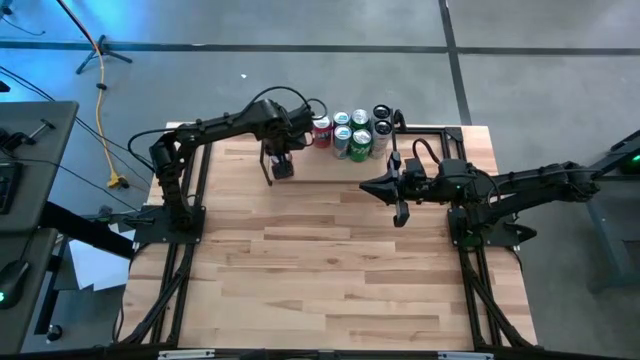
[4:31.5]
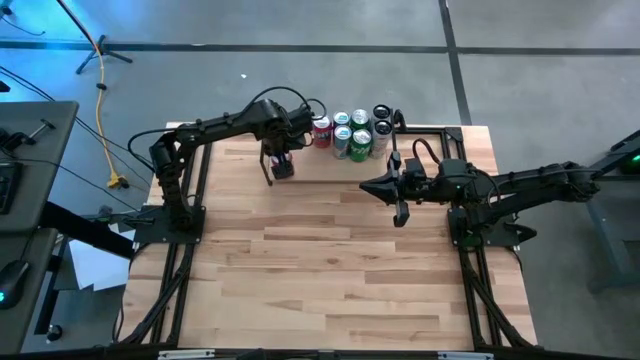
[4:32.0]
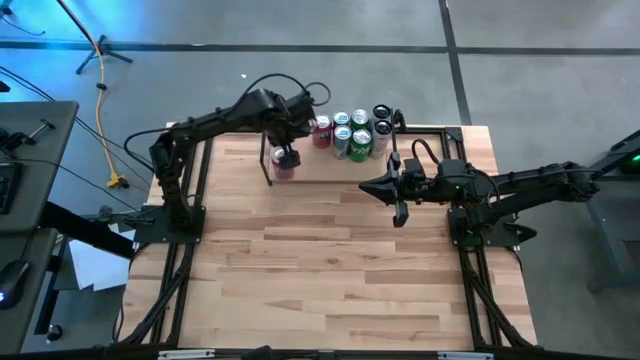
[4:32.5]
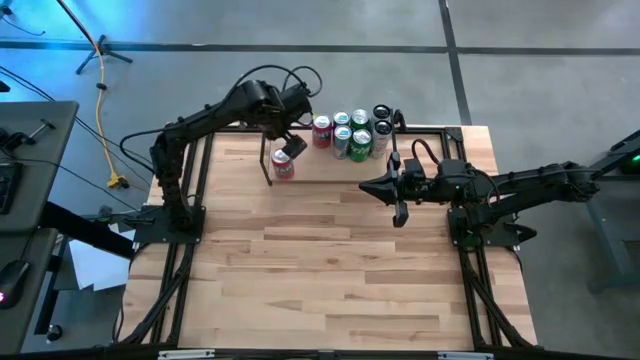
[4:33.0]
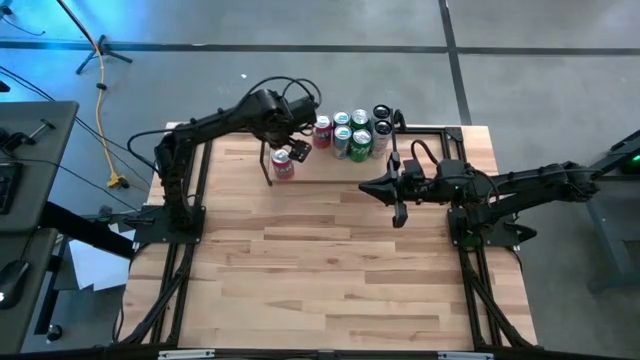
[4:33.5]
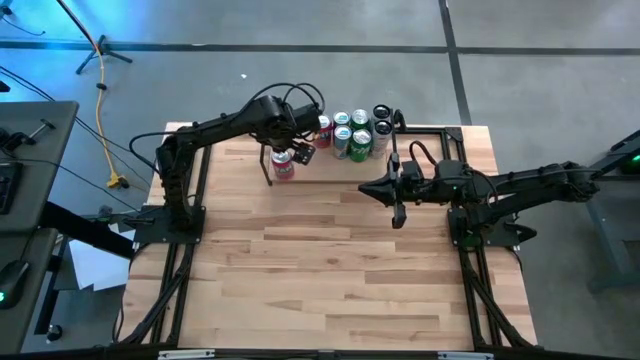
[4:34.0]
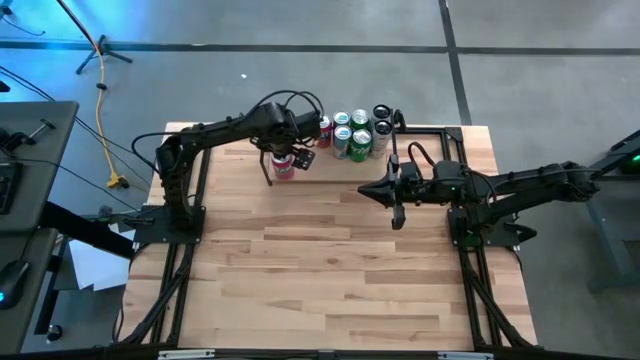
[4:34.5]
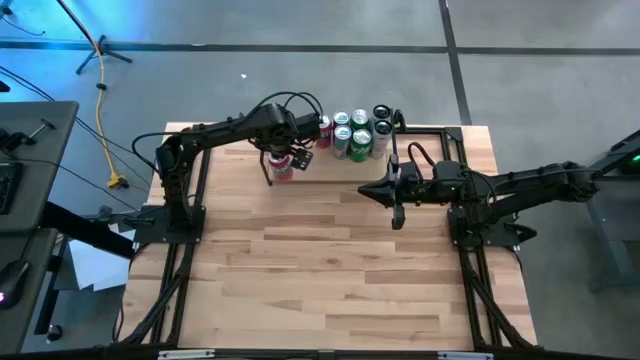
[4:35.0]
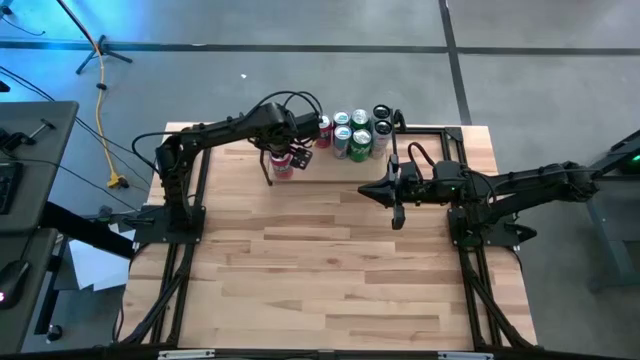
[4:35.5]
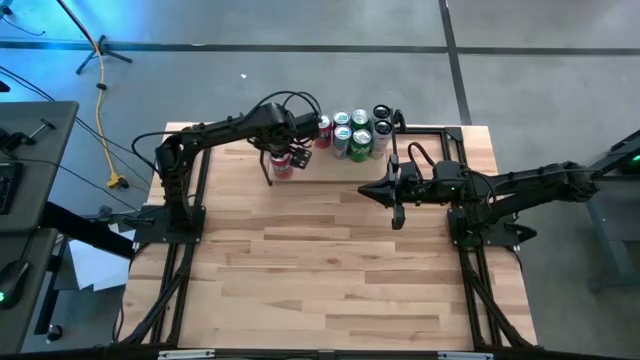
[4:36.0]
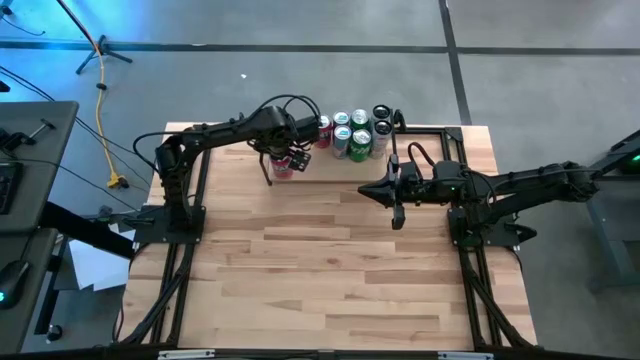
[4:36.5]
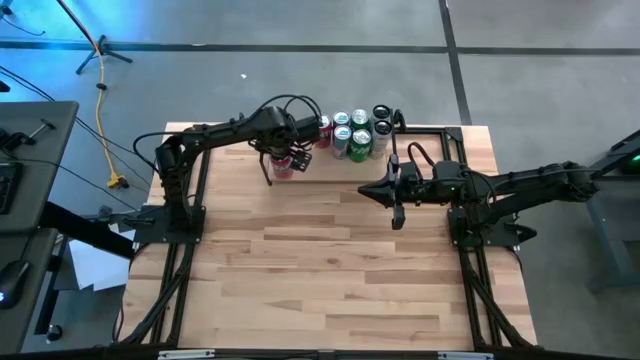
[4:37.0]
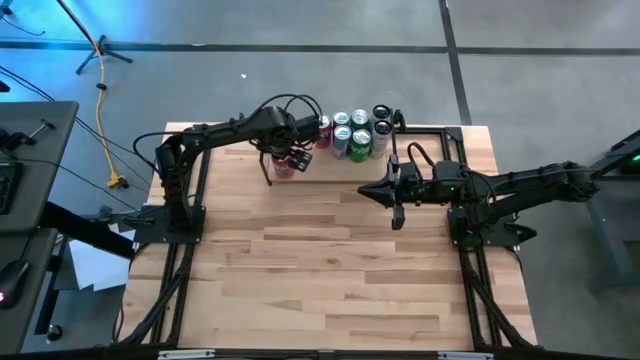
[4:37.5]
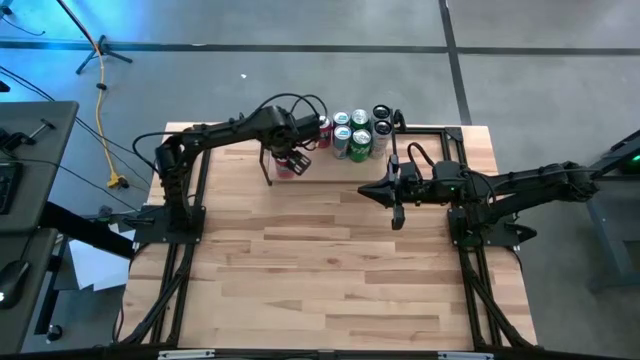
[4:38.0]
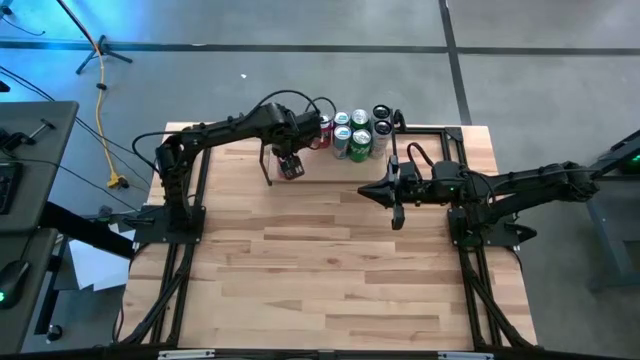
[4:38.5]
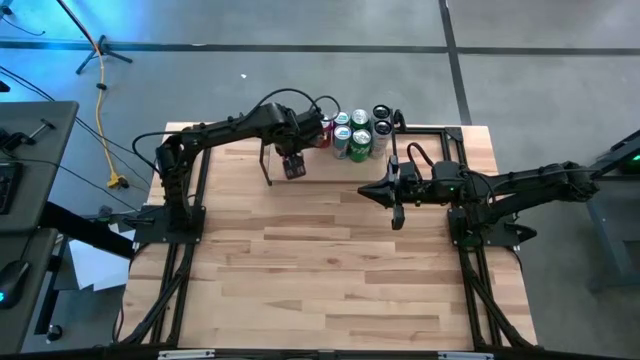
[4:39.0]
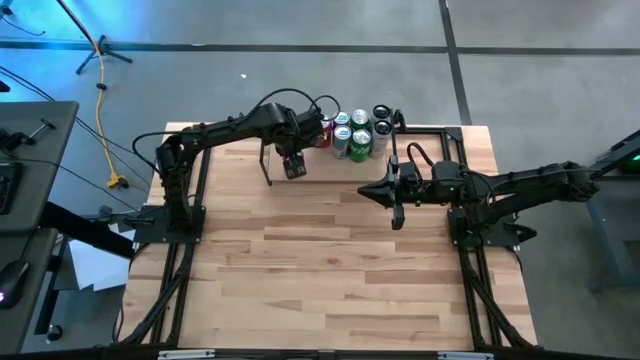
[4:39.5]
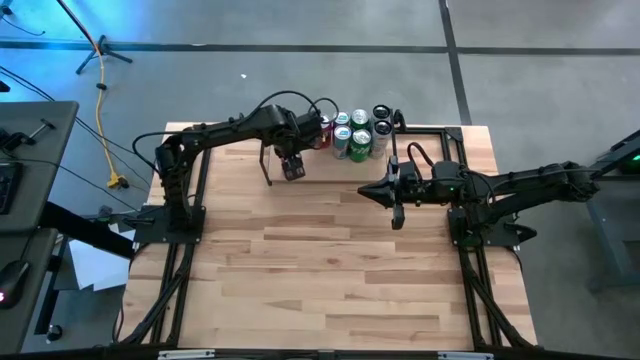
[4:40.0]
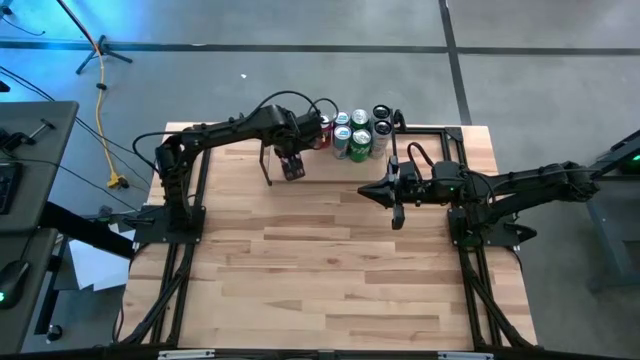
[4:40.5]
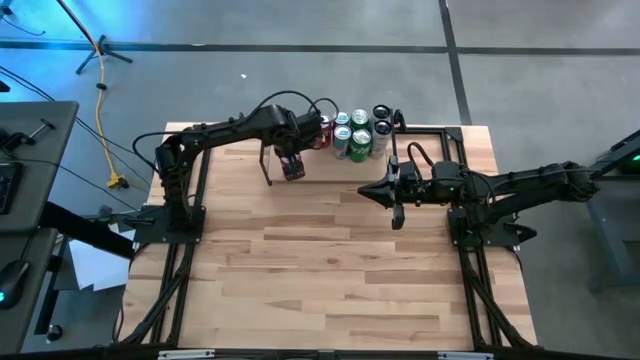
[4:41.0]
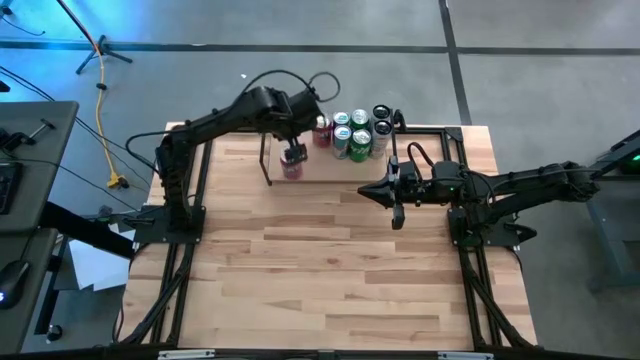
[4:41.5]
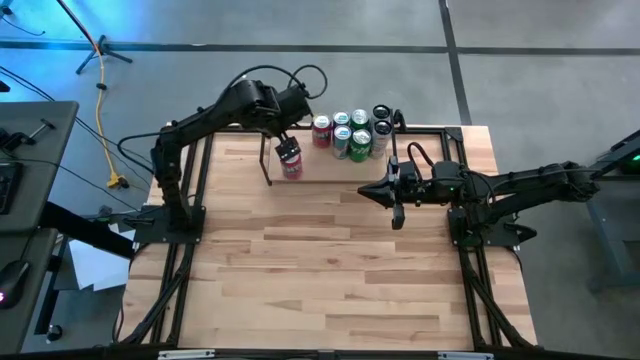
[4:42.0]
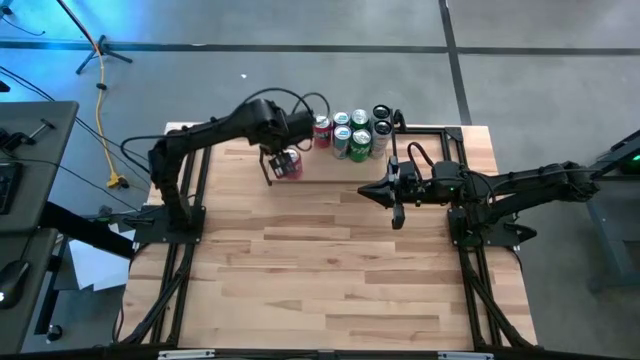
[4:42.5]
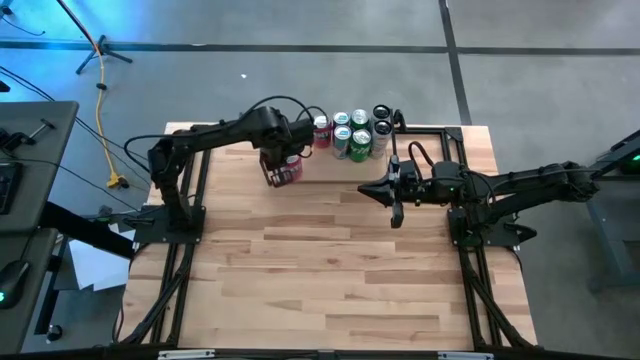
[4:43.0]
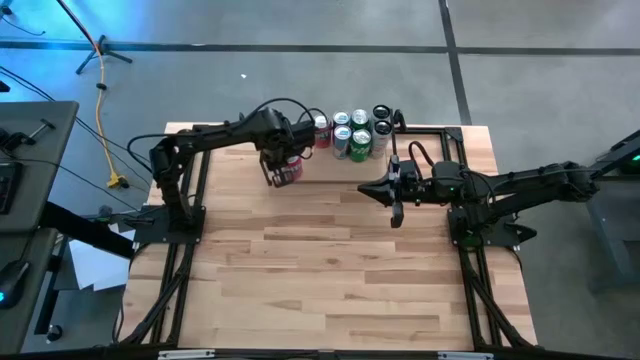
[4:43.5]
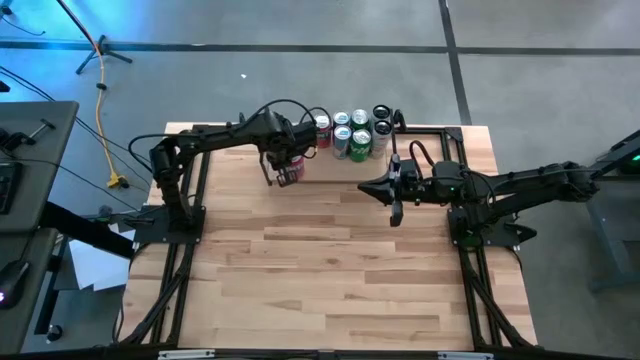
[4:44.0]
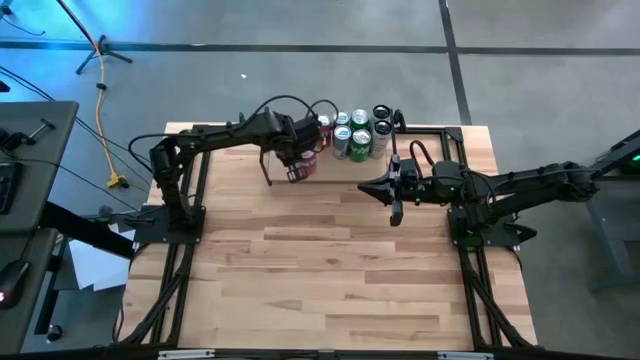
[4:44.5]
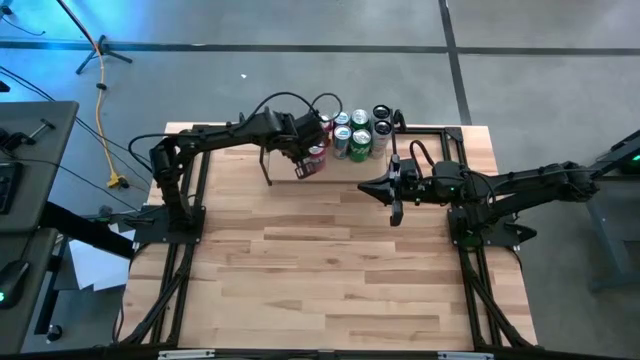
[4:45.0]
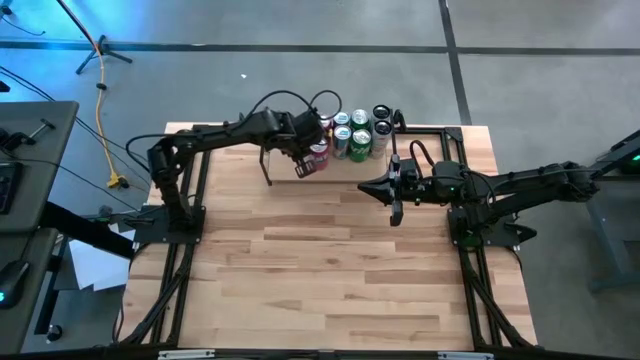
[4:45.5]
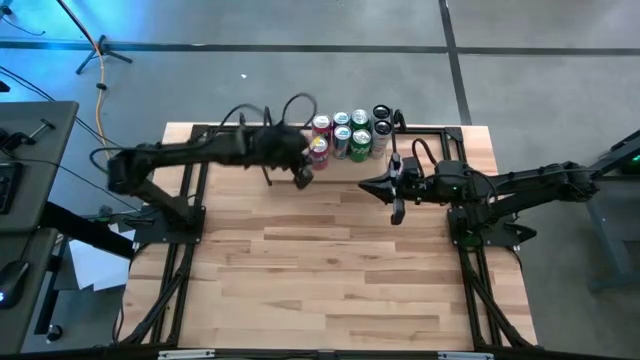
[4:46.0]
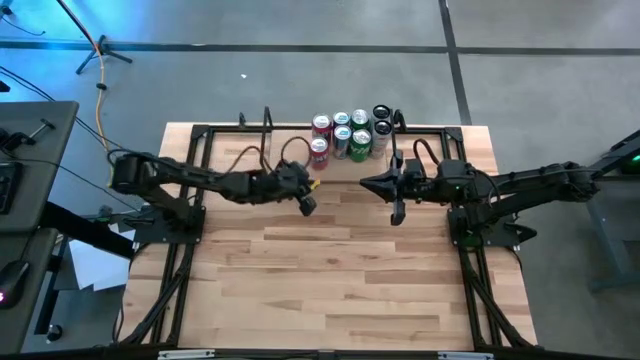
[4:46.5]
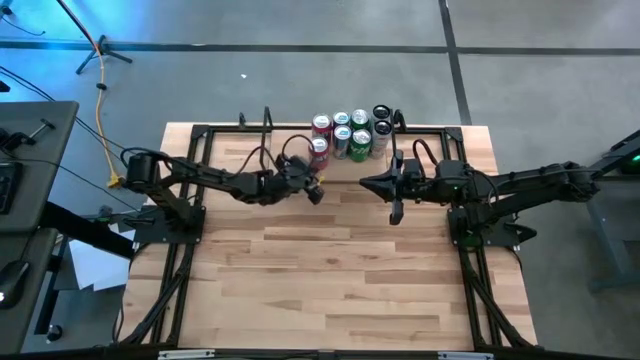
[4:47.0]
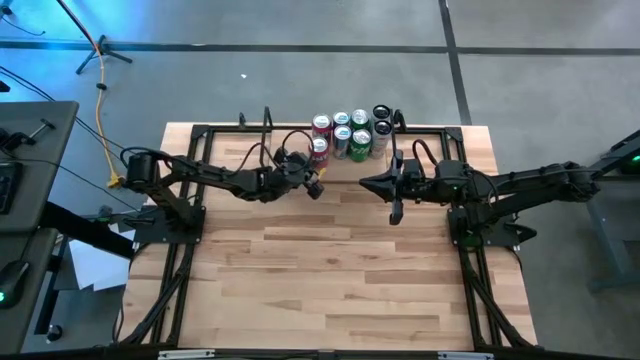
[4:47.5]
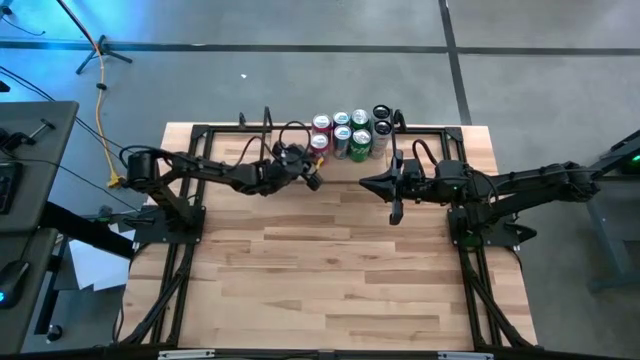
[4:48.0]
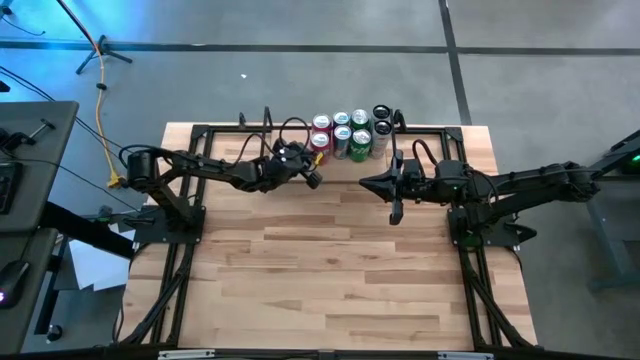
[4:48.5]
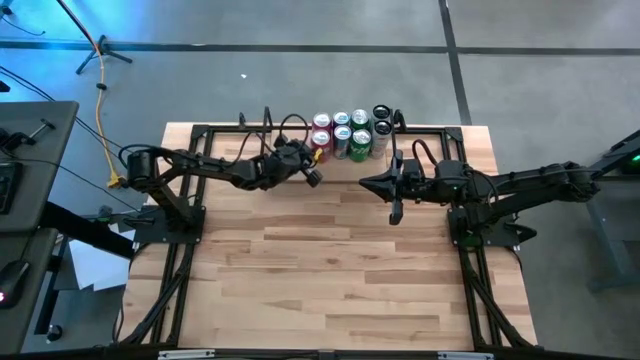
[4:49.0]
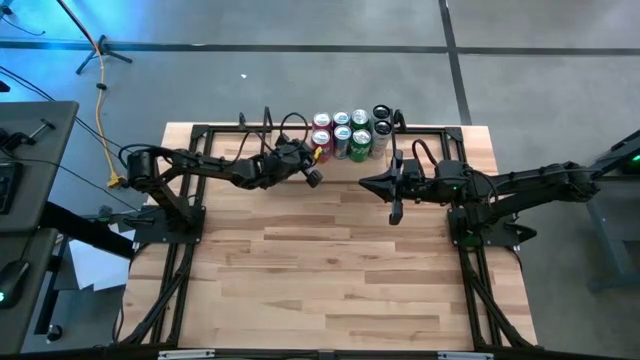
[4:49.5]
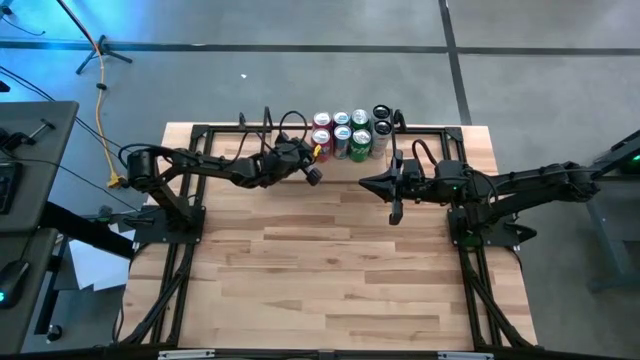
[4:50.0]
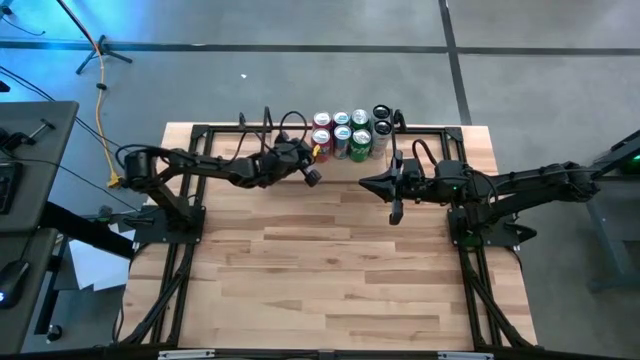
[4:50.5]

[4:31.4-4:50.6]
Task: Place canned beverage on shelf
Put the red soda can on the shelf and align it with the other red soda can

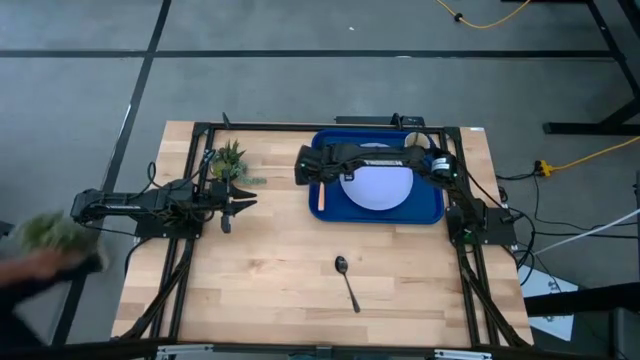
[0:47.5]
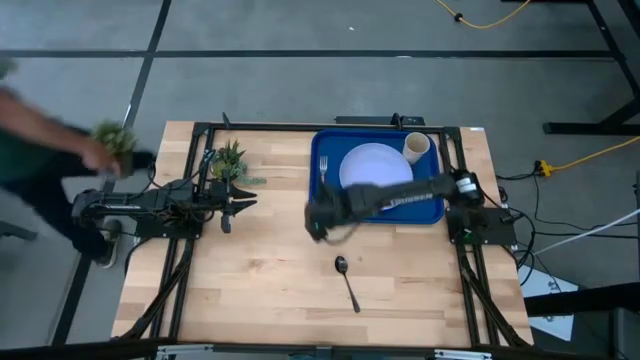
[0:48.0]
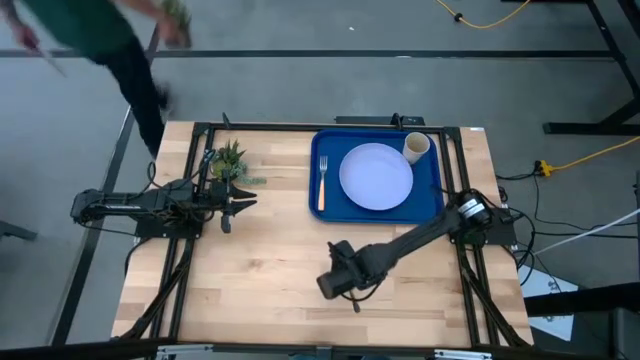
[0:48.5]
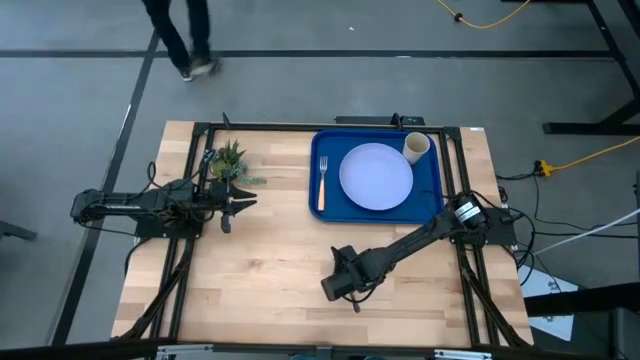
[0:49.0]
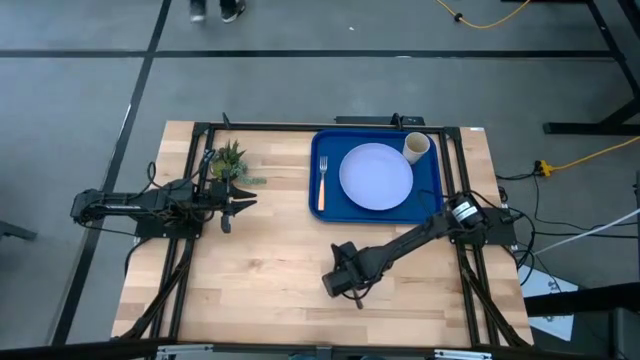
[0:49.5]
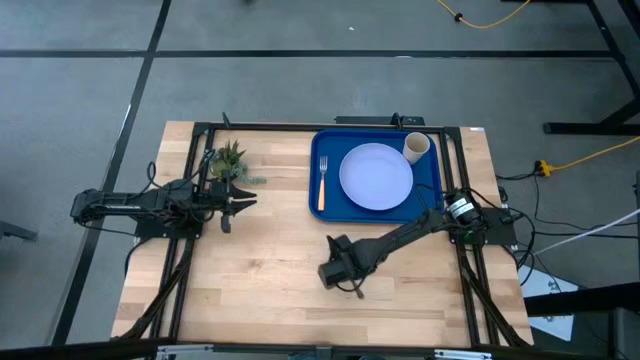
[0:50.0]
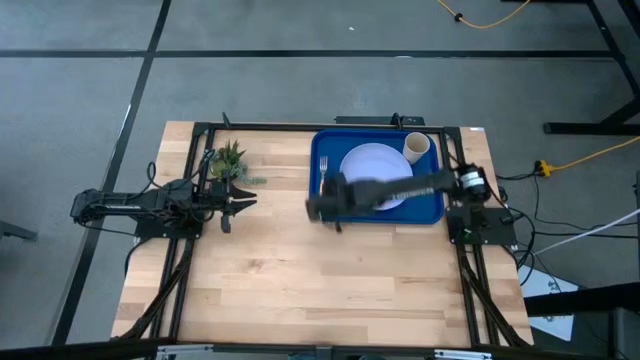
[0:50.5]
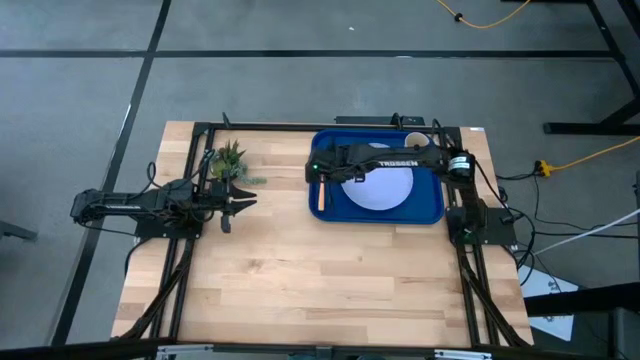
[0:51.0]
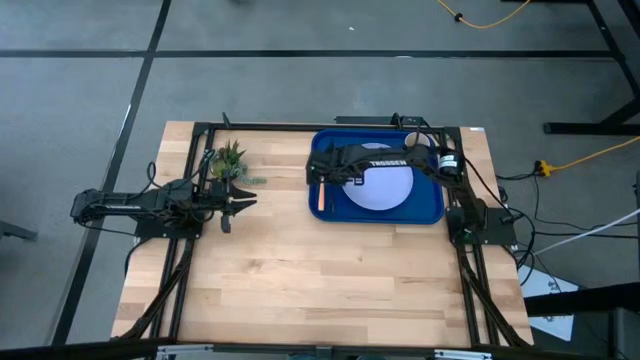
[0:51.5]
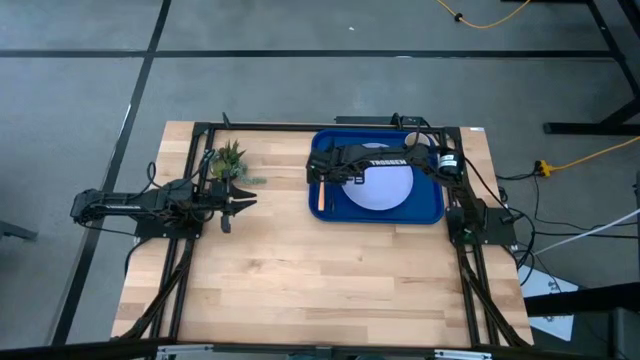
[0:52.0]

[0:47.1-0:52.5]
Task: Pick and place plate/cup/fork/spoon on tray
Put the black spoon in between the yellow fork and purple plate on the blue serving tray
